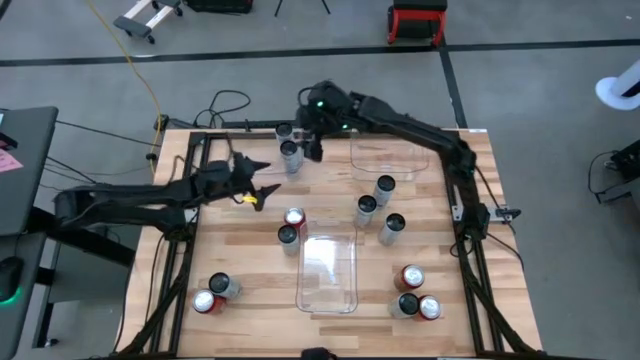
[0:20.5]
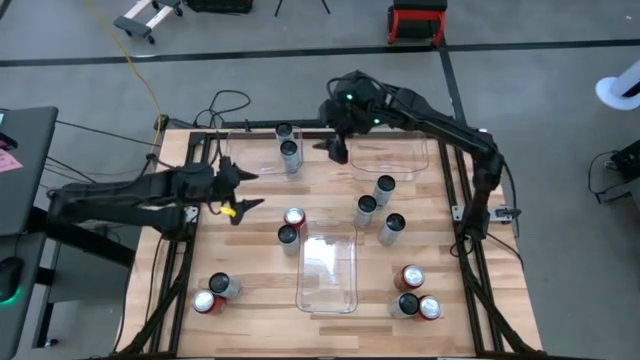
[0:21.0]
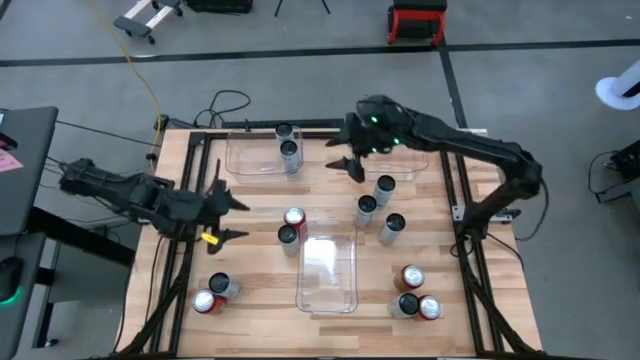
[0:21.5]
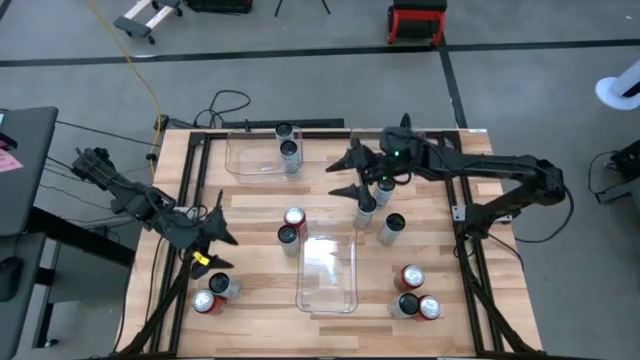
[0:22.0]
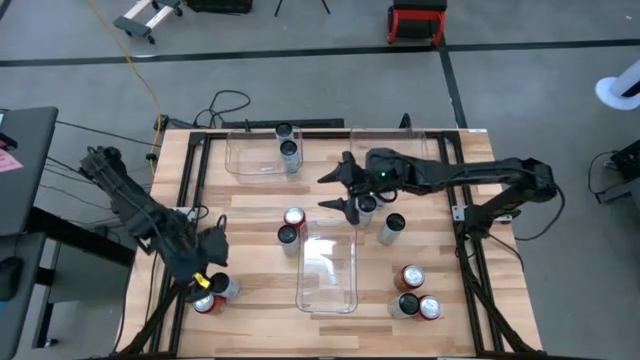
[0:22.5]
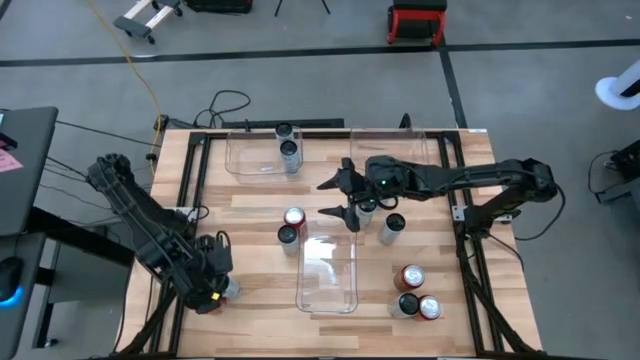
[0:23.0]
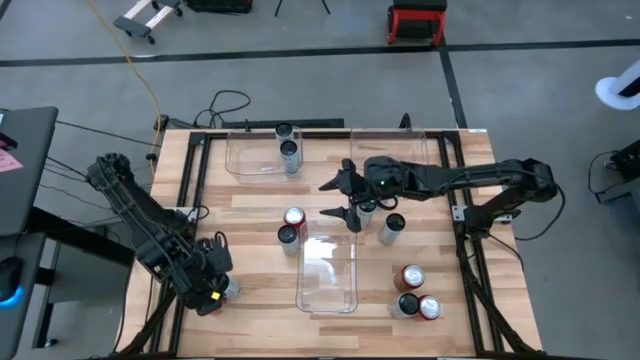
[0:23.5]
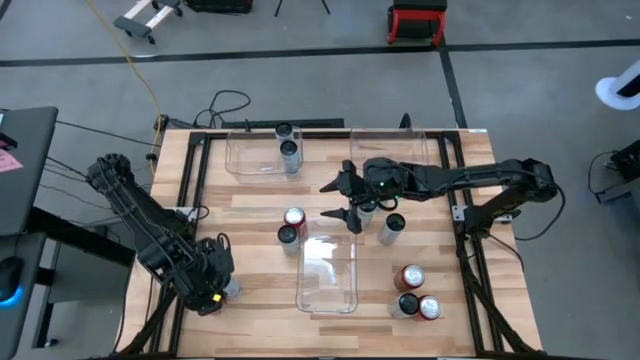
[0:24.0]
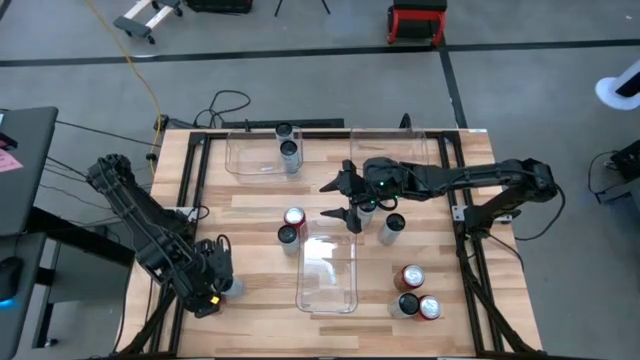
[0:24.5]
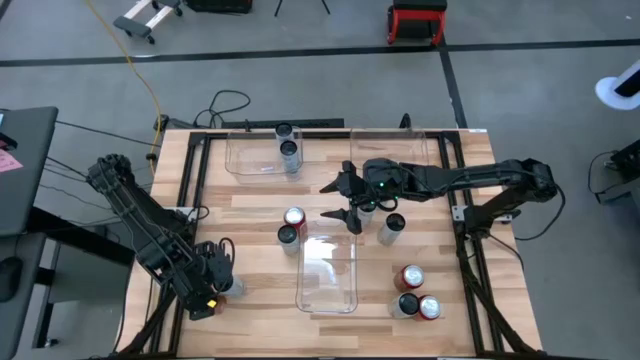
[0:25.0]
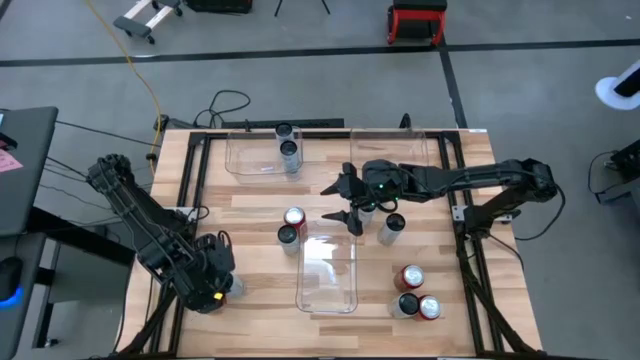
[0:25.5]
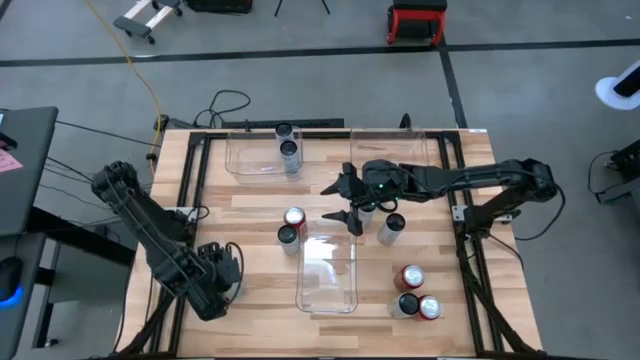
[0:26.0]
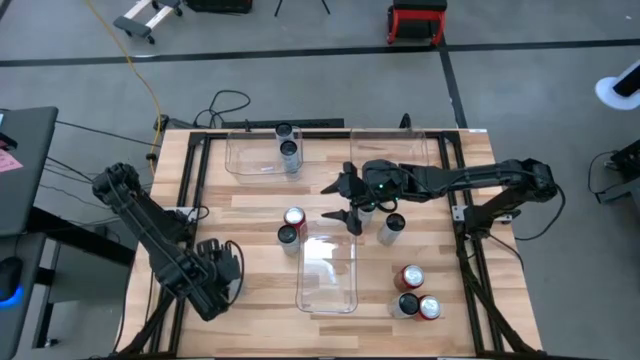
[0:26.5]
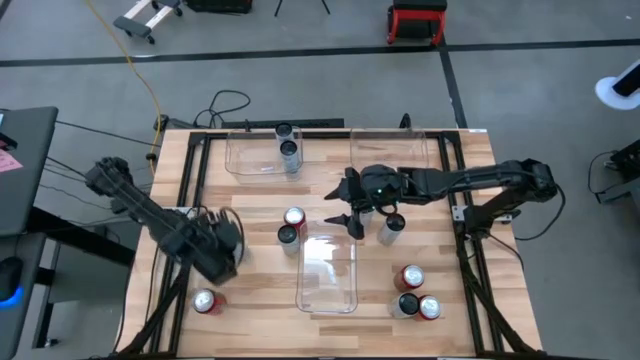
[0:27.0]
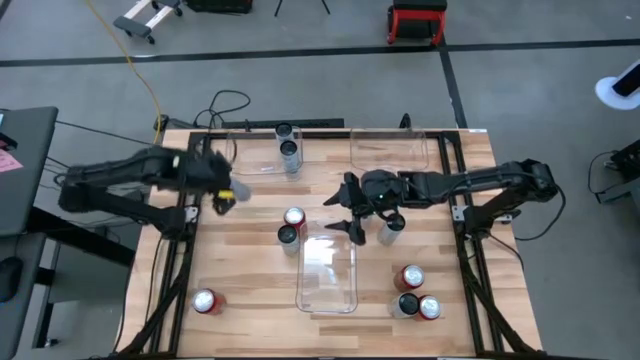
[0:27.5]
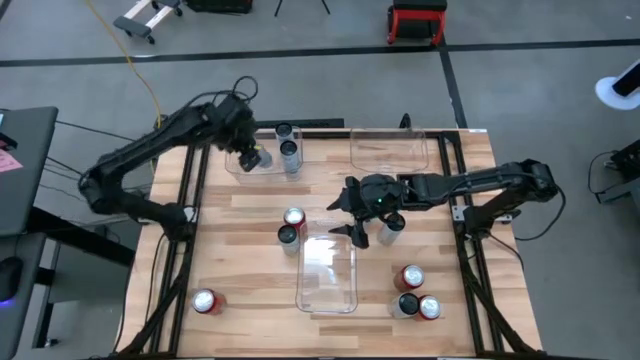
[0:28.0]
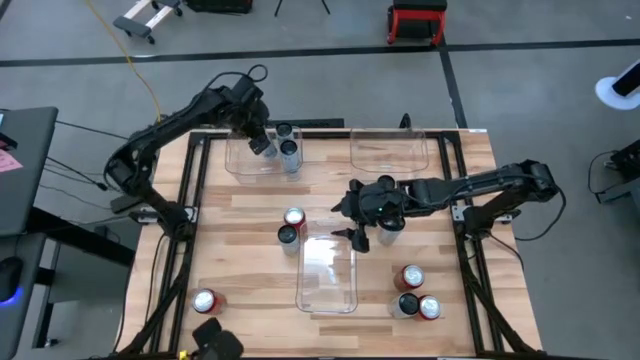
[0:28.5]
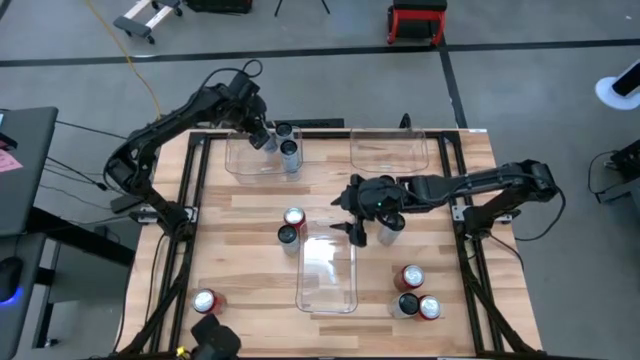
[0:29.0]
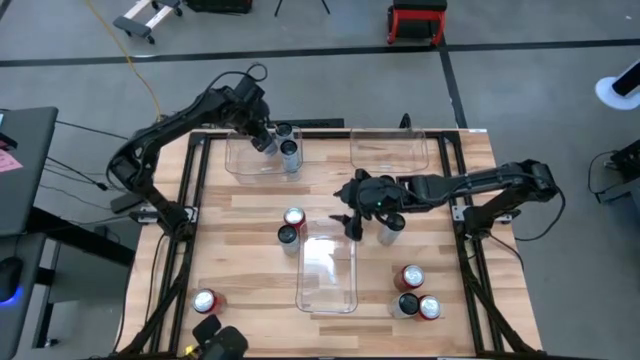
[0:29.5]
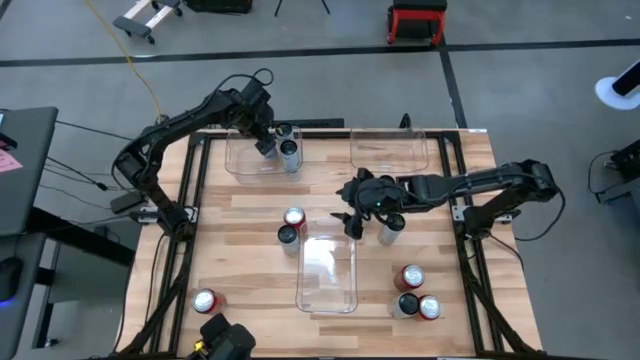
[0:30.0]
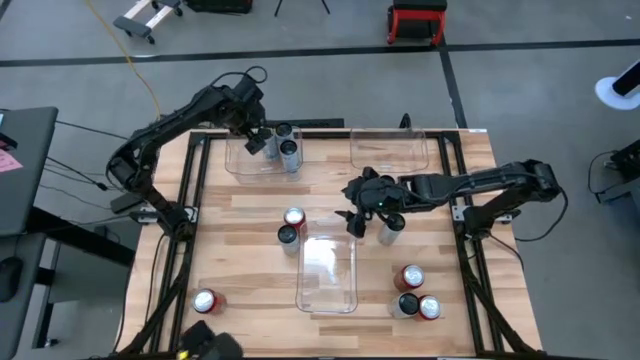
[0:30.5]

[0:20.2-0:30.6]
Task: Sort soda cans
Put the white-blue soda can into the top left transparent bin

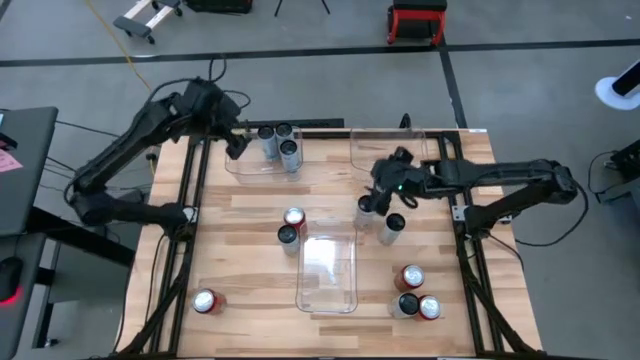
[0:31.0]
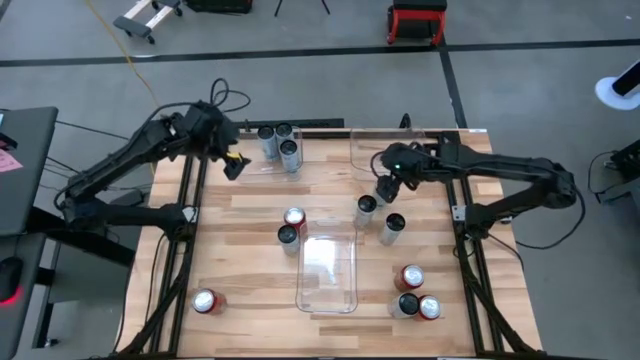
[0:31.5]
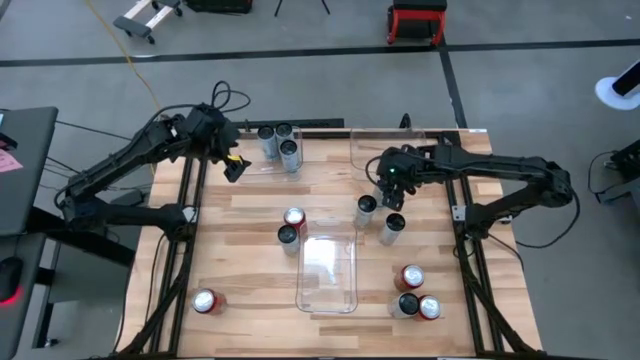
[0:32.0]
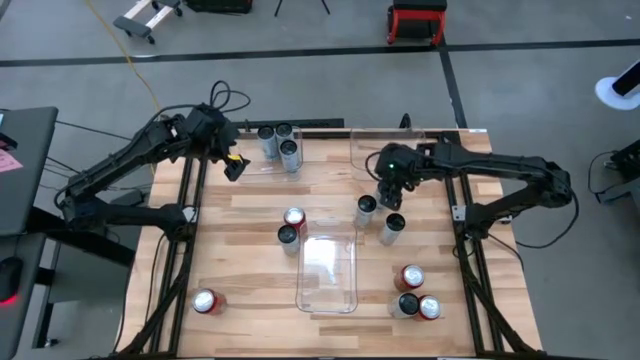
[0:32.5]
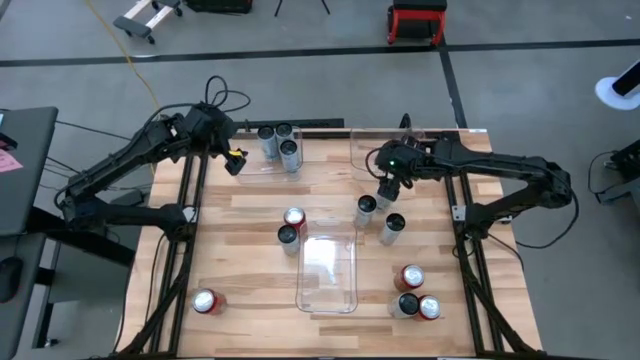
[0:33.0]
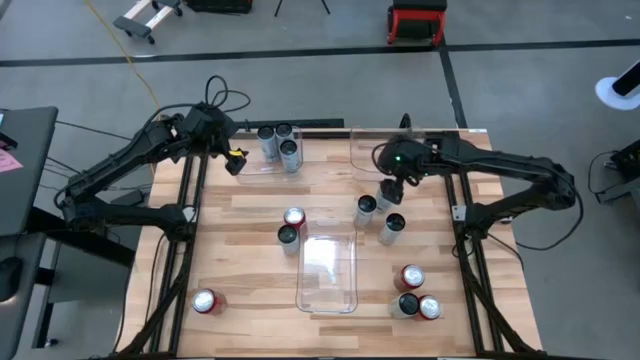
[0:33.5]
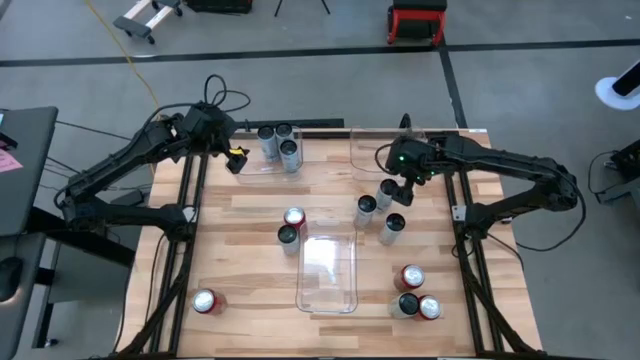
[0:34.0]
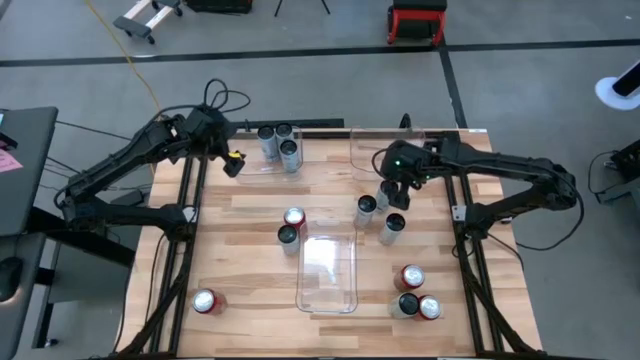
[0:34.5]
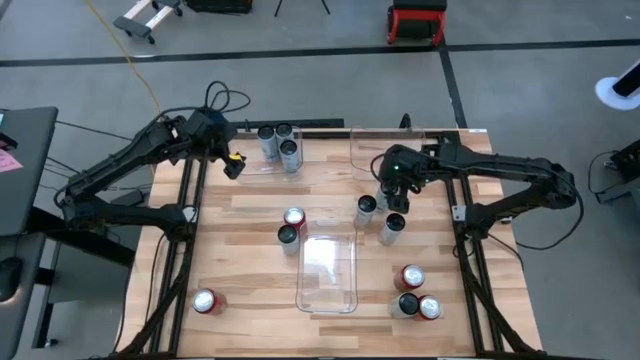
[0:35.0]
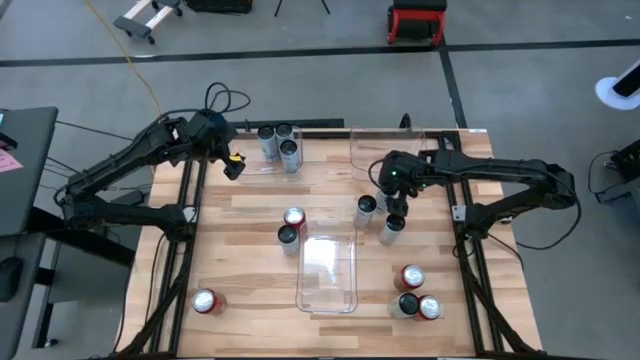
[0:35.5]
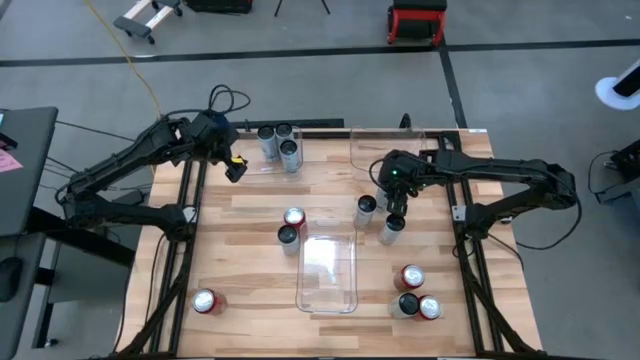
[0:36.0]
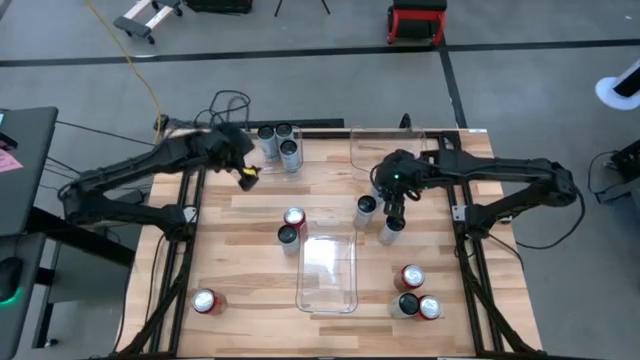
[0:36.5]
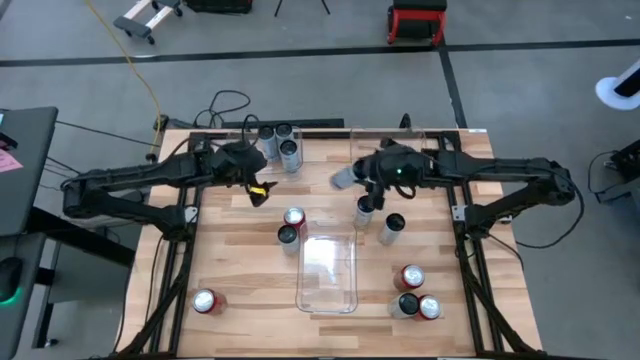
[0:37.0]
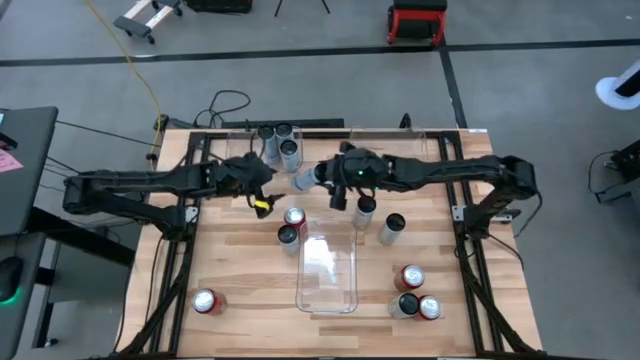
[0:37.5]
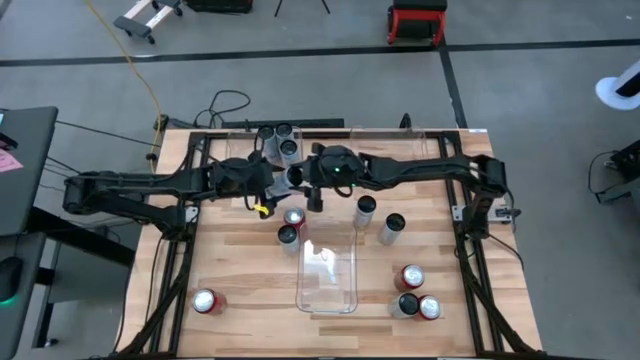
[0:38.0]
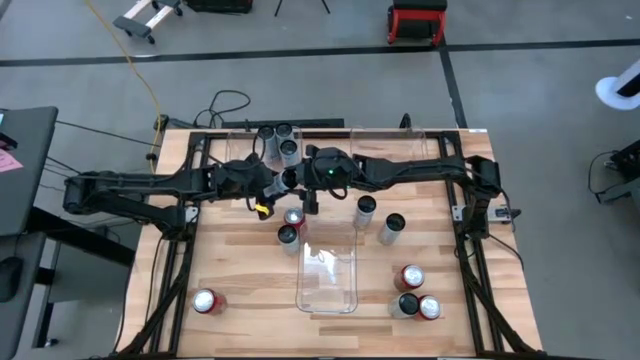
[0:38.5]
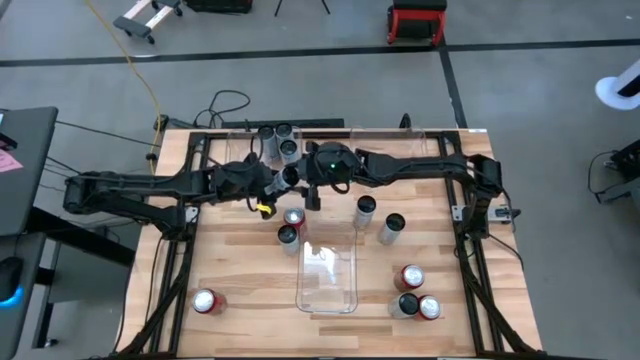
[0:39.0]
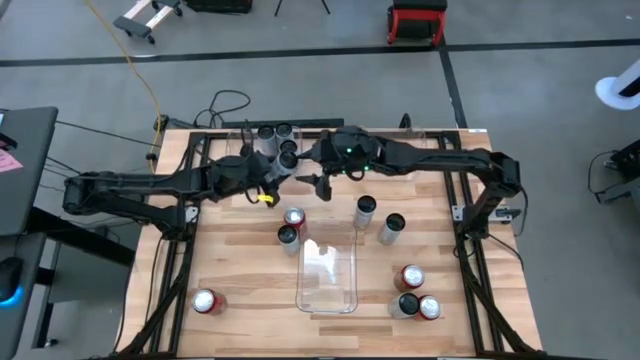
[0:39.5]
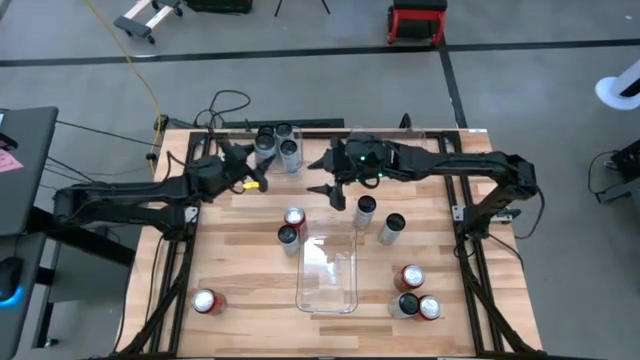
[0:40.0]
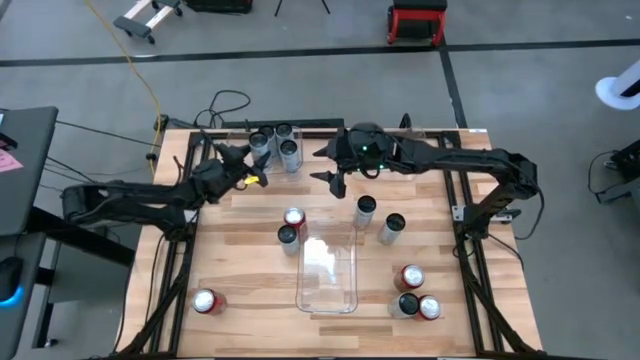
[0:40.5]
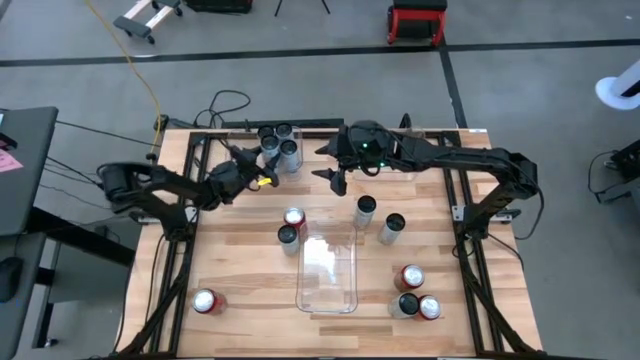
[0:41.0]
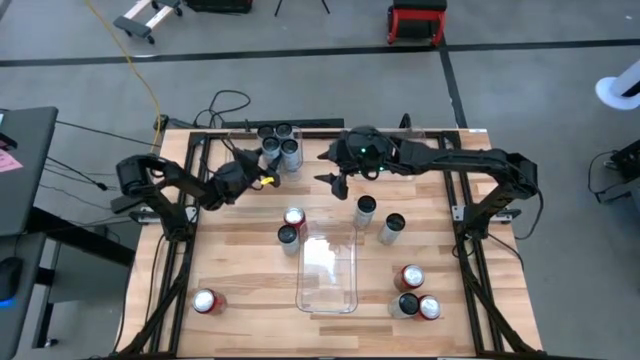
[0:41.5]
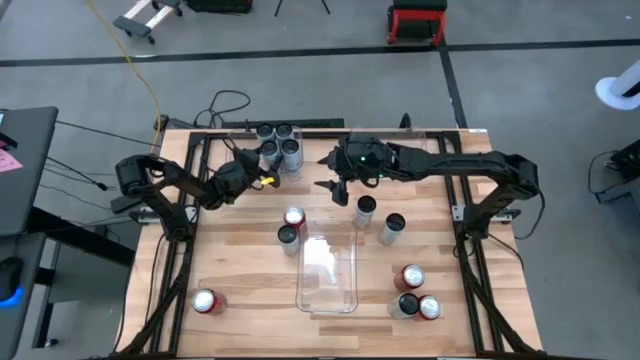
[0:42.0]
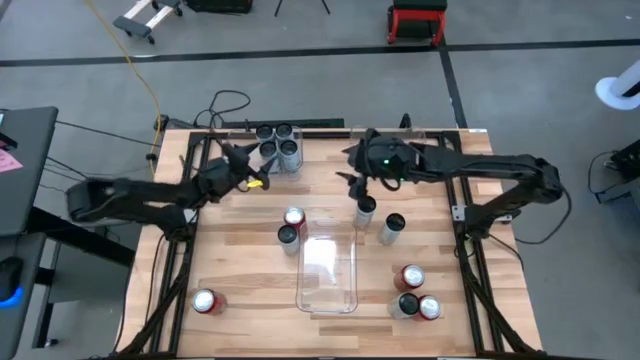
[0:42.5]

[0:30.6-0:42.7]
Put the white-blue soda can into the top left transparent bin
